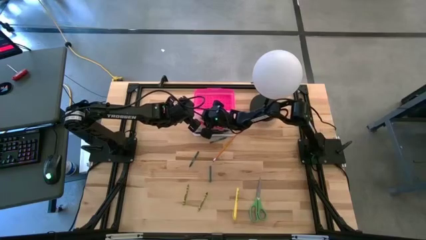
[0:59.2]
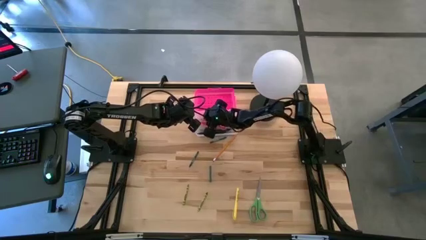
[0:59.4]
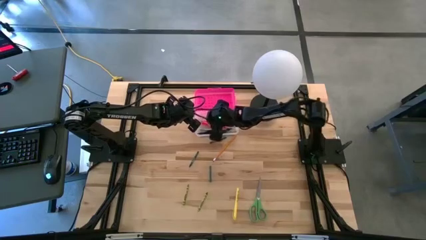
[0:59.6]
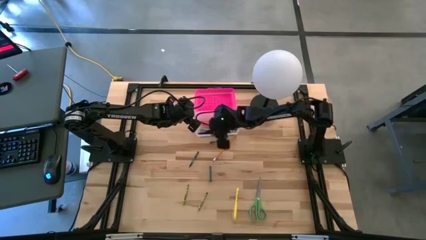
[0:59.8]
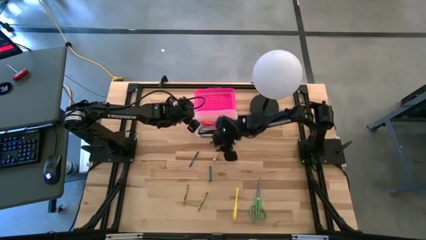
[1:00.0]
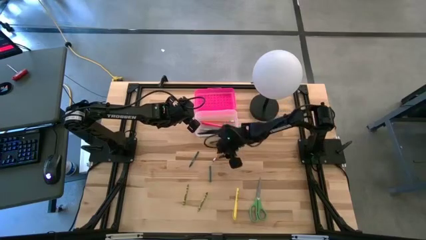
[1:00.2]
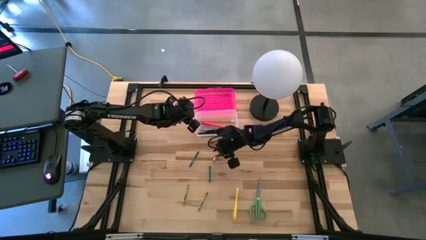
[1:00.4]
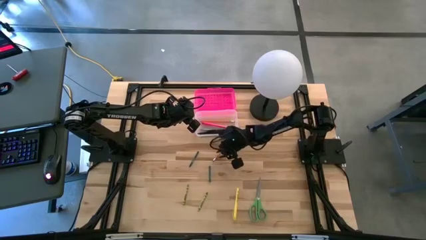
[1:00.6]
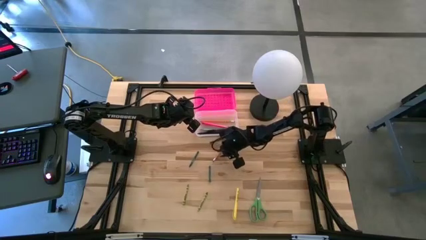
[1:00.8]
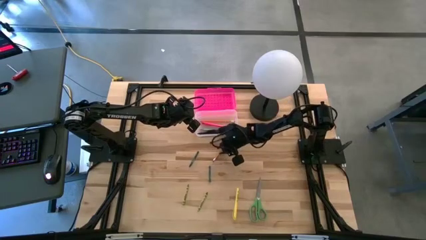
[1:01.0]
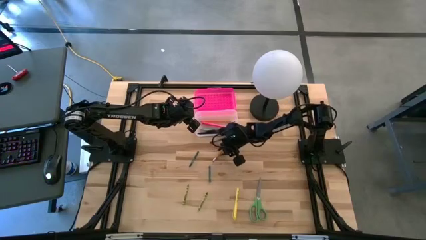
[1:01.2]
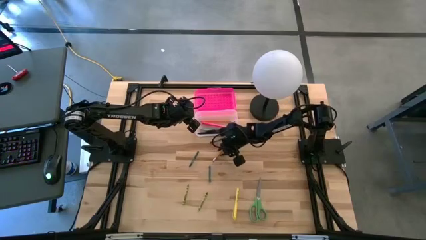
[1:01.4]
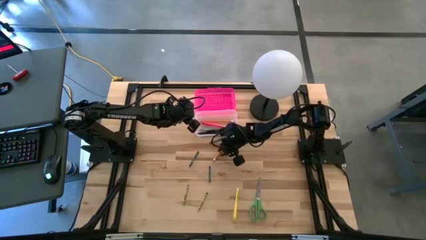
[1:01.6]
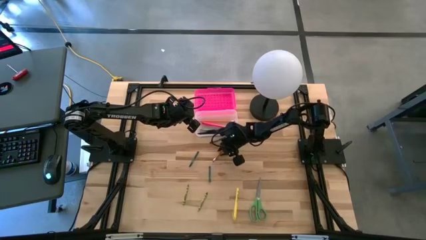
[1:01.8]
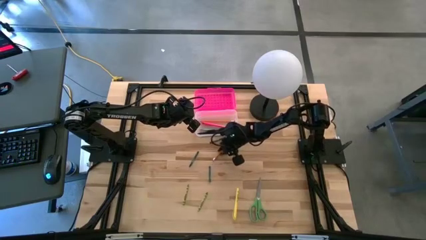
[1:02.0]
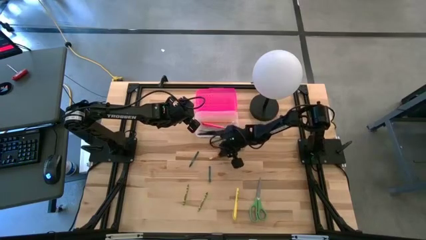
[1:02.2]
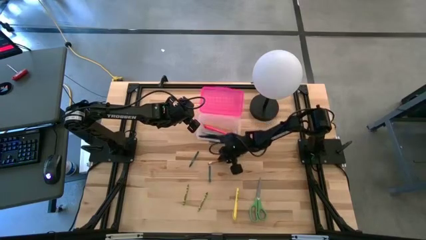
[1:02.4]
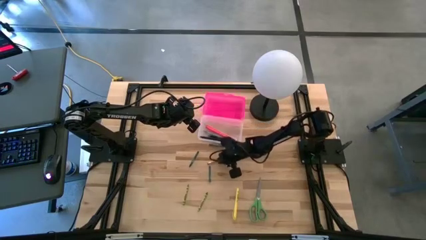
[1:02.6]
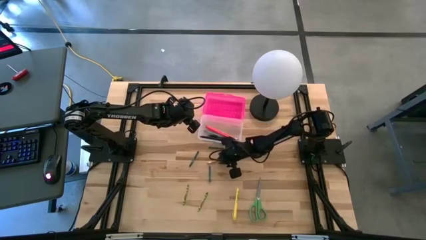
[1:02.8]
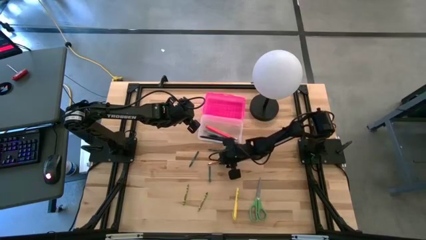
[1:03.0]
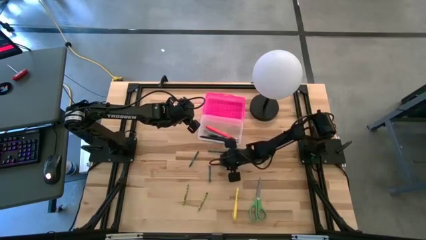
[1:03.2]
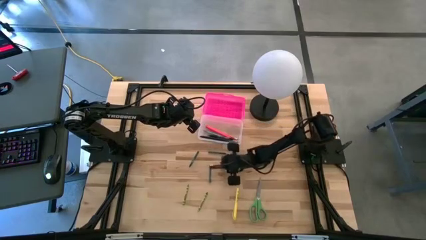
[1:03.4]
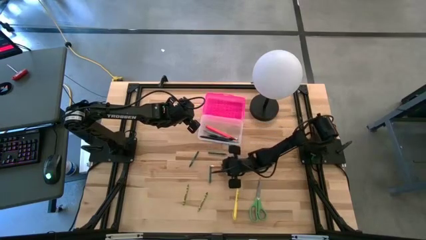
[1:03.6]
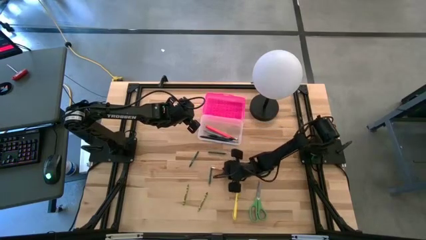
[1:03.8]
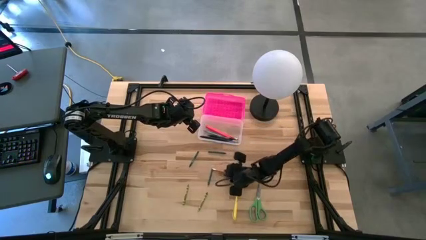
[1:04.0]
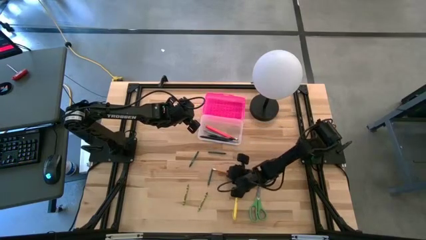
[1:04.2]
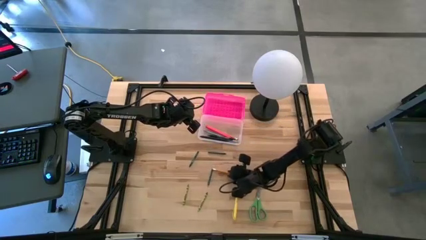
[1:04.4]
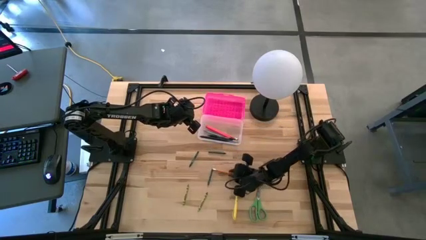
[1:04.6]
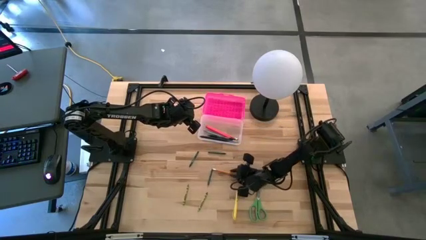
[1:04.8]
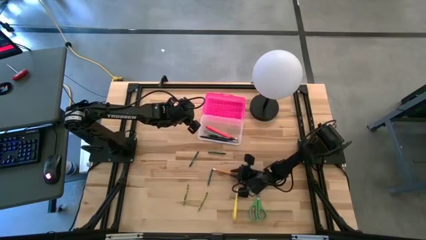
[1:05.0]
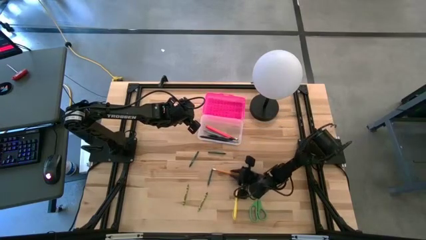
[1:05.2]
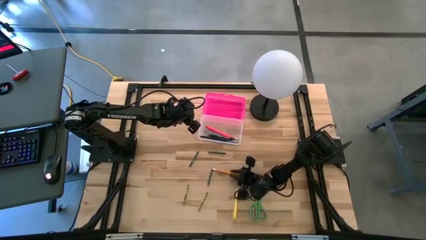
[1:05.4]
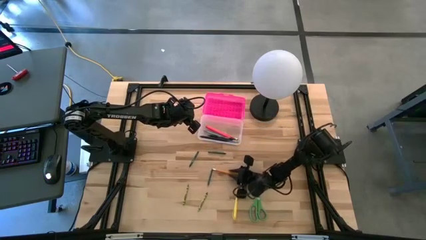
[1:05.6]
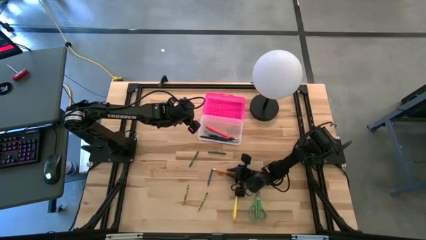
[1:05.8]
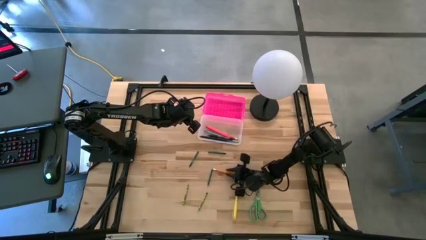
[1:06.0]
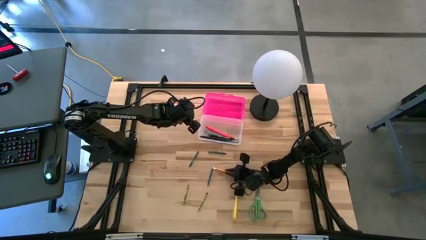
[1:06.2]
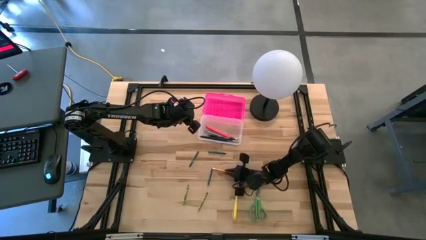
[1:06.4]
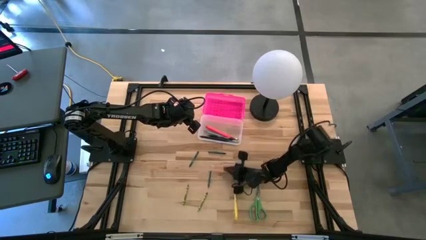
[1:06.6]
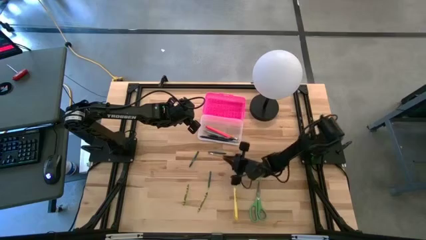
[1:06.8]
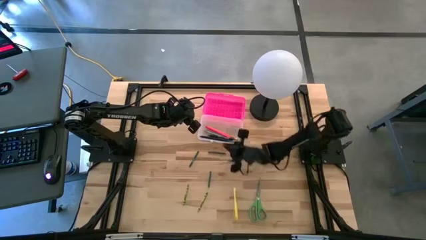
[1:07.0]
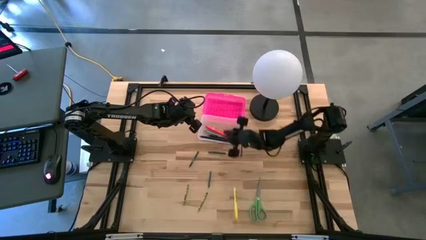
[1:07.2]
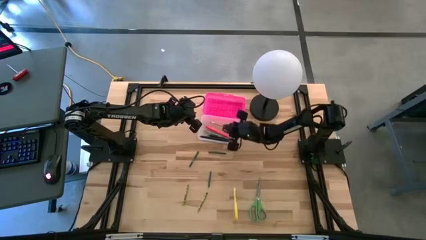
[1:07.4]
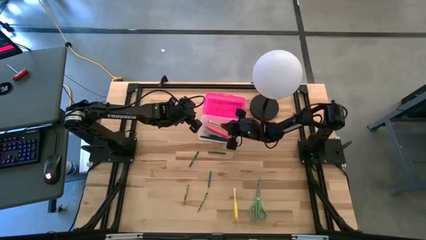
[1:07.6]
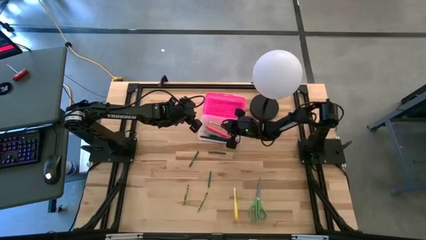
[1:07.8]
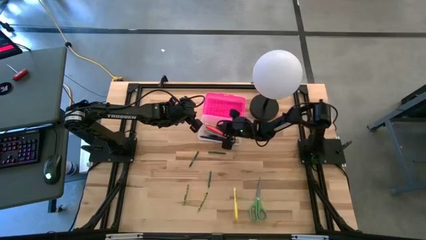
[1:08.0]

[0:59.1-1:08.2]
Task: Pick & place school supplies into a supply box
Put the orange pencil into the transparent supply box

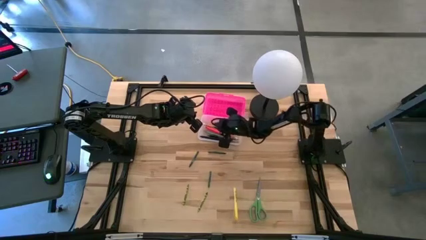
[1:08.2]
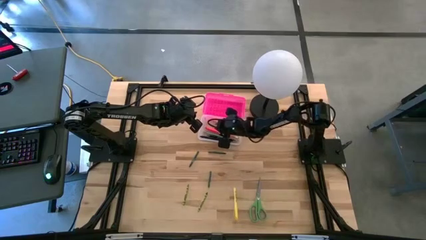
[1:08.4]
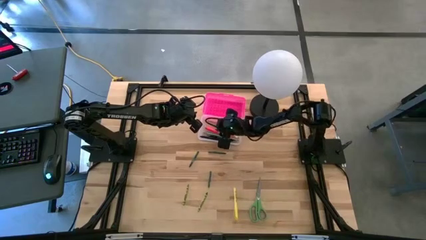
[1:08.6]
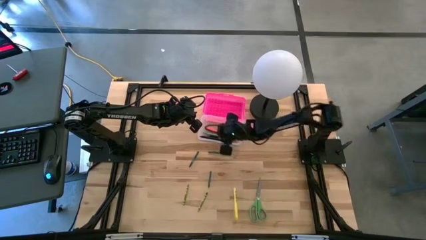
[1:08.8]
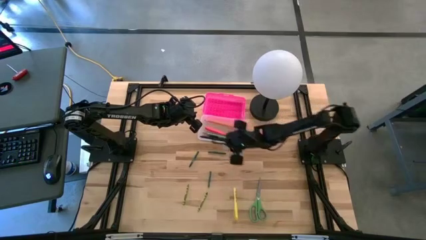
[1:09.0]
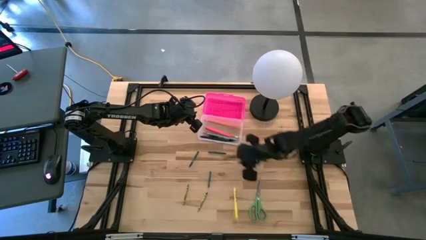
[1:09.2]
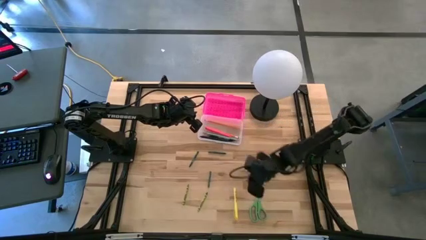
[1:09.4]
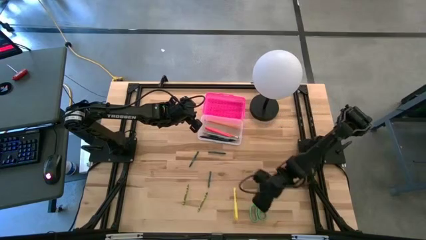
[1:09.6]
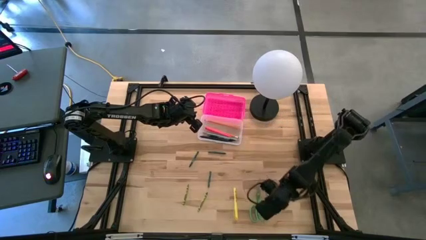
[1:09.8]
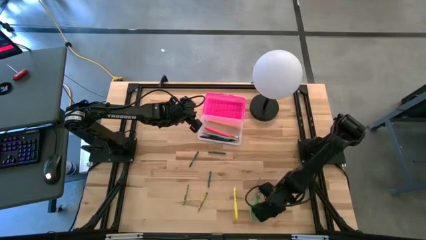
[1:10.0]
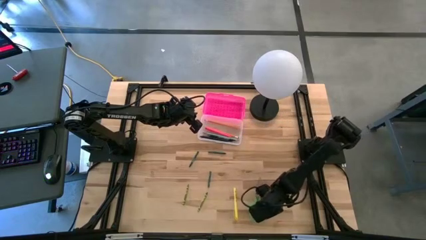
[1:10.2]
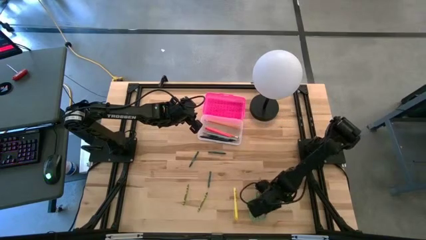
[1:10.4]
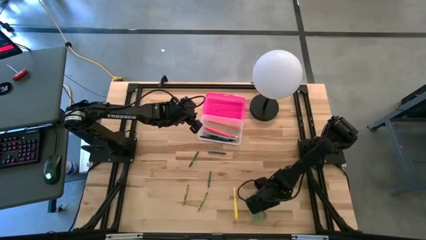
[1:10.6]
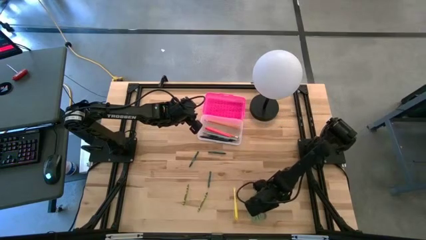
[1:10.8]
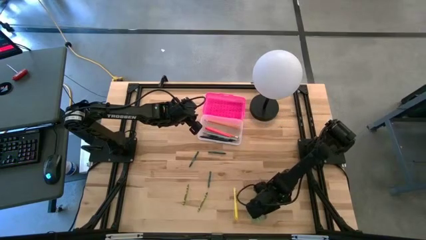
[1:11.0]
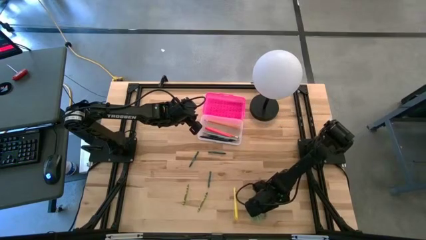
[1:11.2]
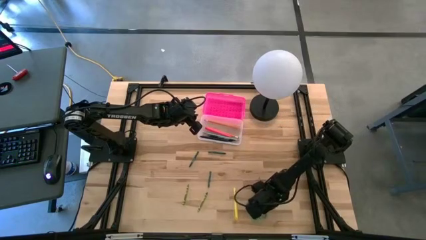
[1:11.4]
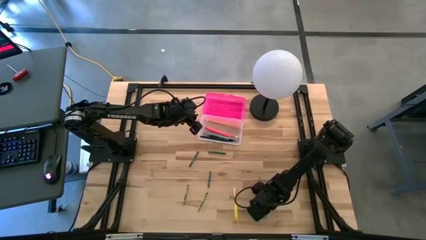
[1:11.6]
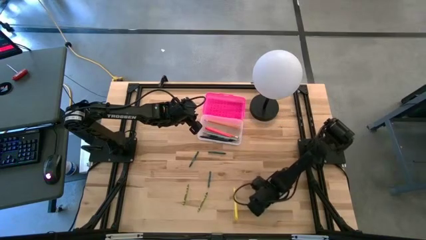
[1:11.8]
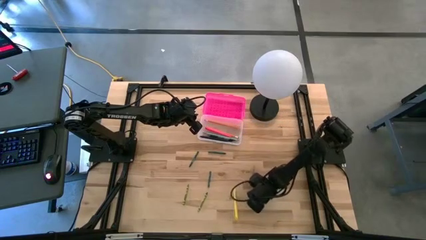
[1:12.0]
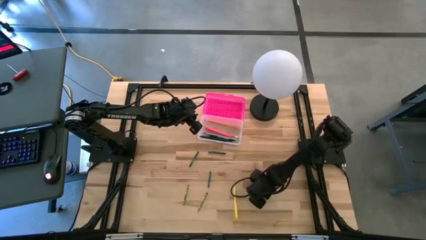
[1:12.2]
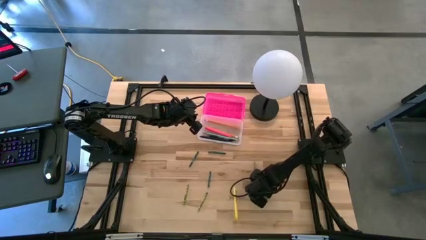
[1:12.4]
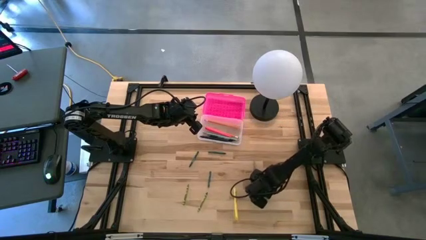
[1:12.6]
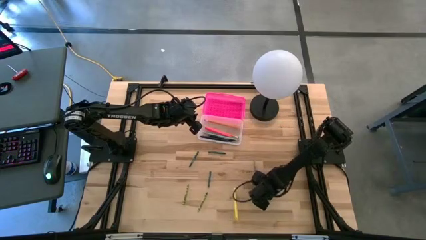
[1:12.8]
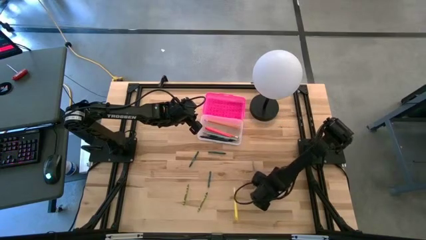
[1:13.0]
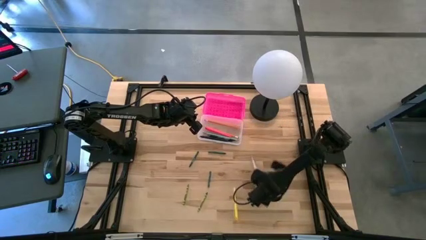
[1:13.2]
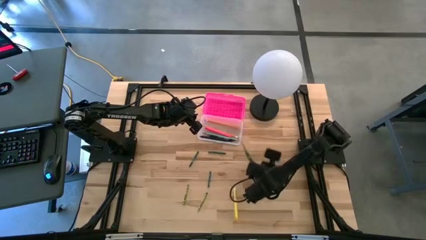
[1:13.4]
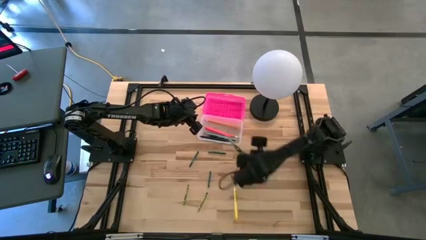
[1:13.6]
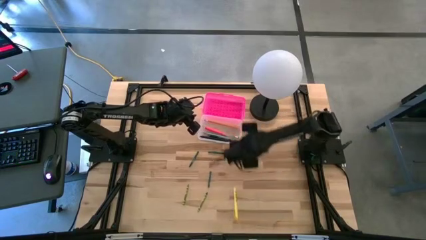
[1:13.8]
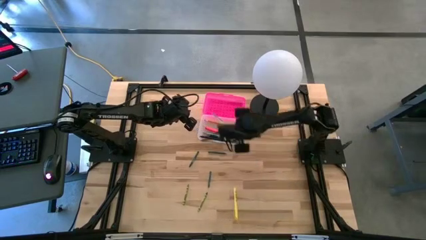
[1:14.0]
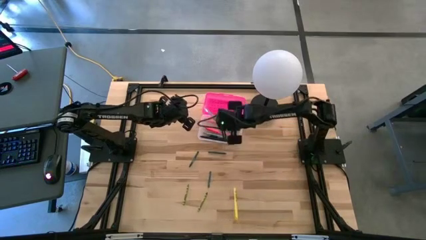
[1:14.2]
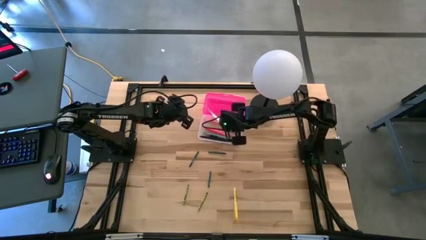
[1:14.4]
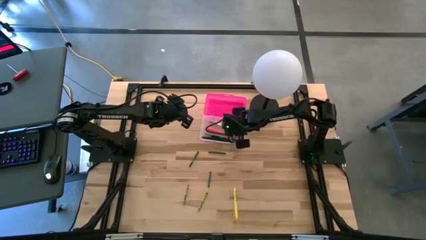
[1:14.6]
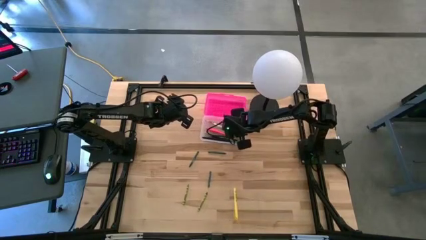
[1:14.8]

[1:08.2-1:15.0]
Put the green scissors into the transparent supply box
